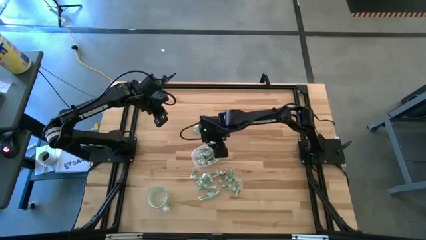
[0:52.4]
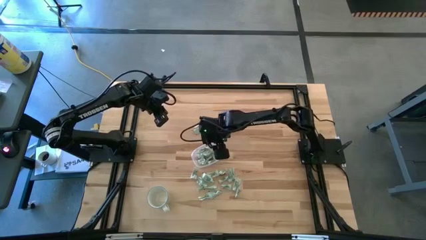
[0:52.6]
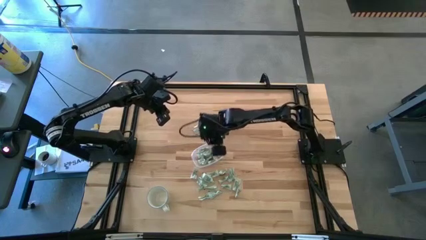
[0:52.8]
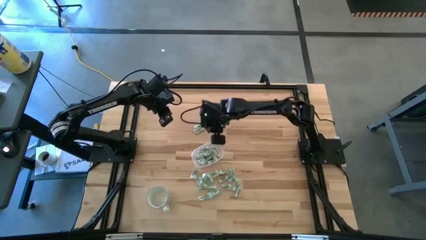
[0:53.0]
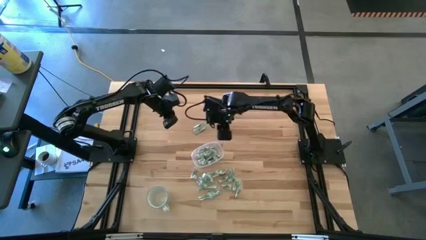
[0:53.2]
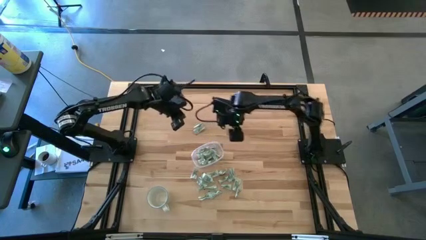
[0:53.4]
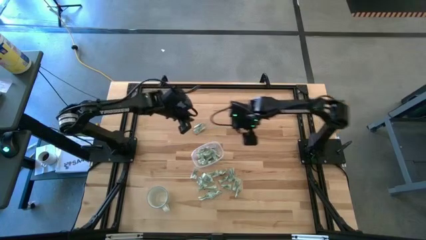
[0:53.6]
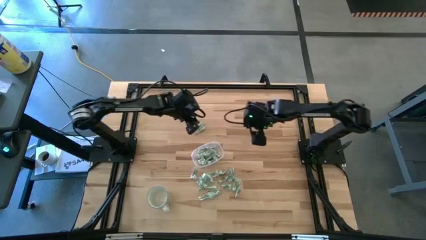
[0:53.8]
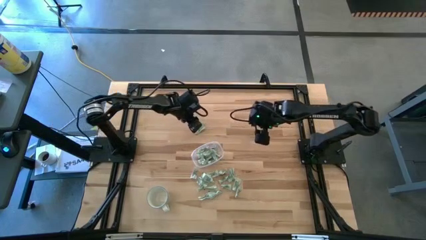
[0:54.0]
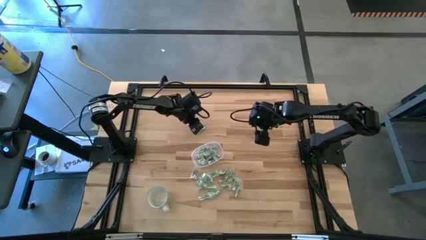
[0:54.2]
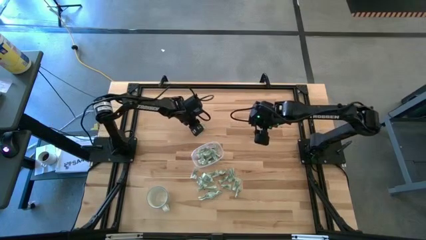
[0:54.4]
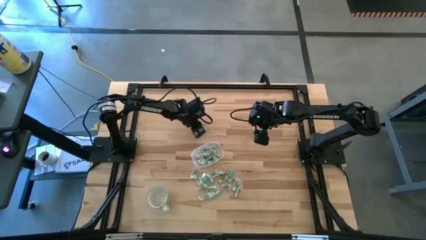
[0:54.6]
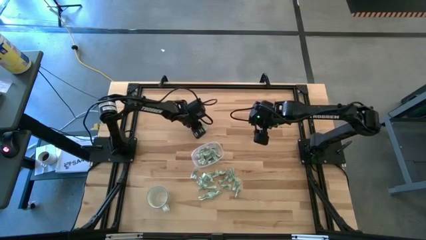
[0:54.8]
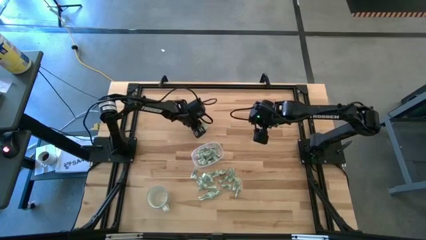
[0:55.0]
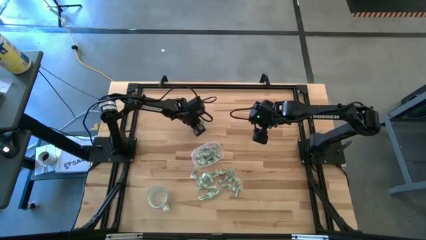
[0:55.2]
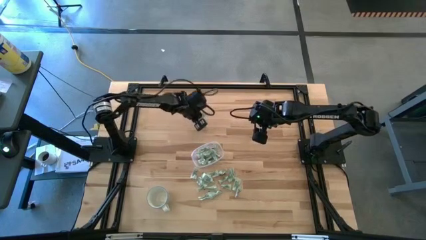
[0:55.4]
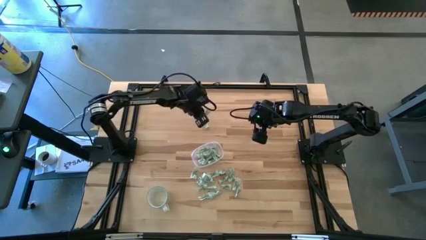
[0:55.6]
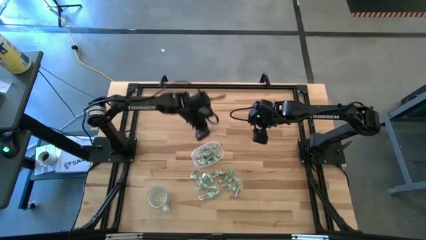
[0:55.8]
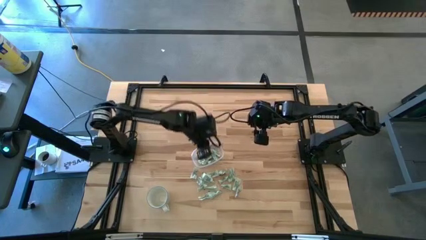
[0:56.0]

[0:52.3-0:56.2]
Task: Pick and place Stevia / Truvia into bins
Put the stevia packet into the transparent container

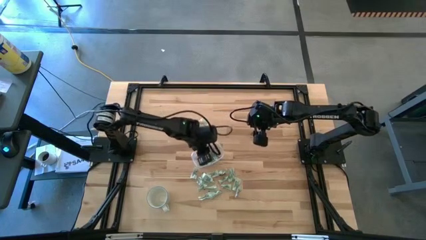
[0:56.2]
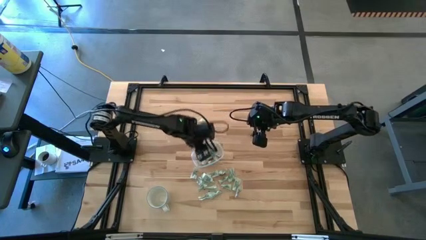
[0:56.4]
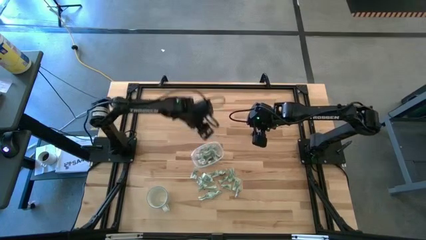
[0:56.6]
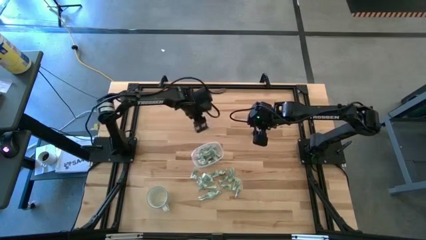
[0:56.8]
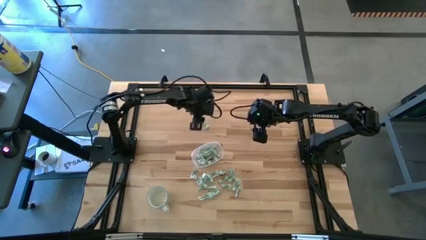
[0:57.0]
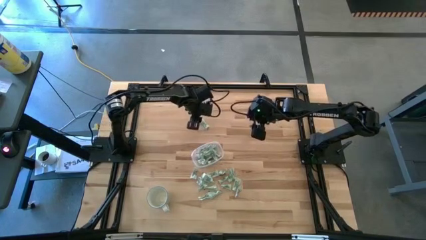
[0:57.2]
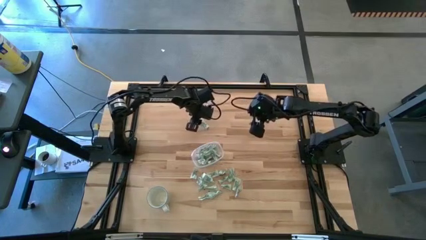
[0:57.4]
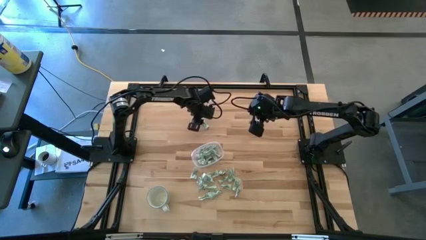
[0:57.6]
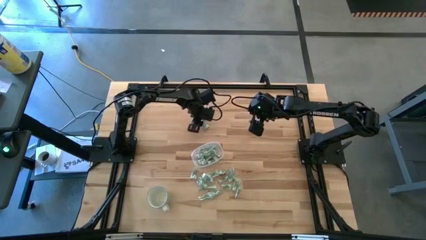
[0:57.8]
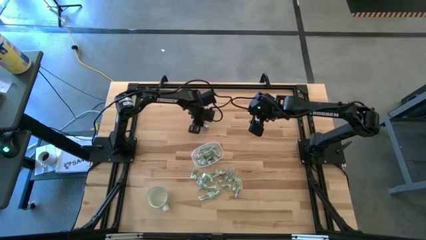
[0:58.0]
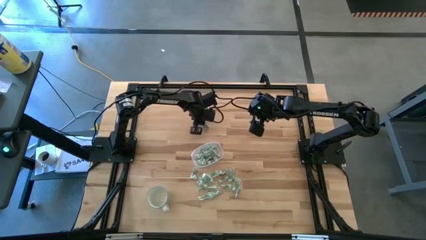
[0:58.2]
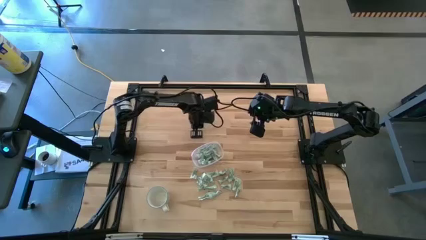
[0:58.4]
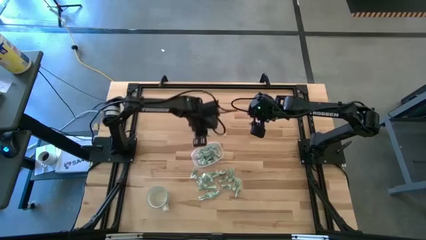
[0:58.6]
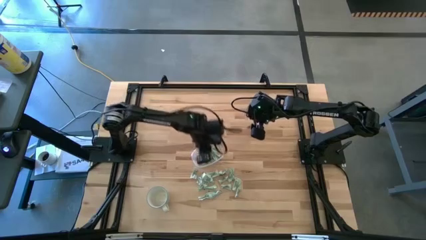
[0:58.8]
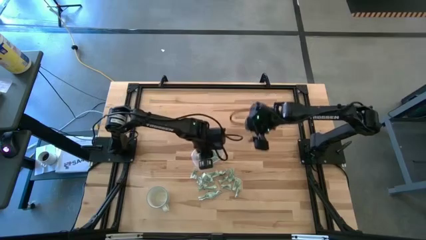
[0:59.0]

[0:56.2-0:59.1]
Put the stevia packet into the transparent container

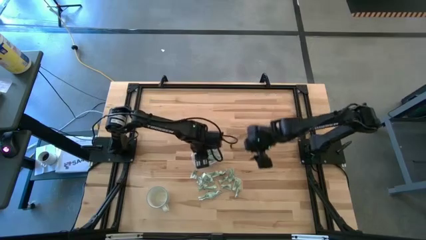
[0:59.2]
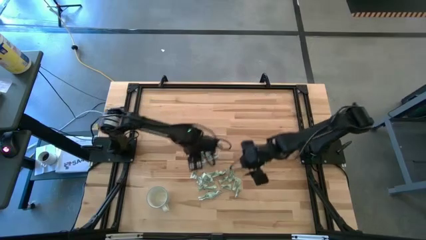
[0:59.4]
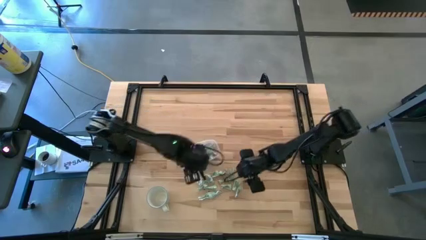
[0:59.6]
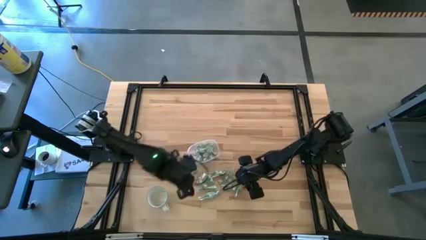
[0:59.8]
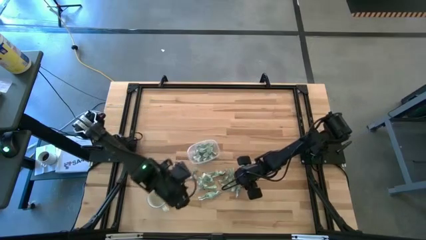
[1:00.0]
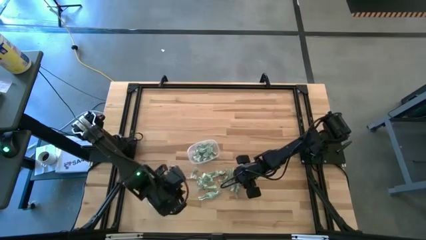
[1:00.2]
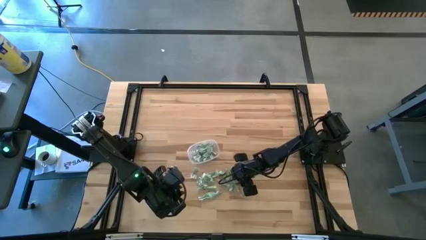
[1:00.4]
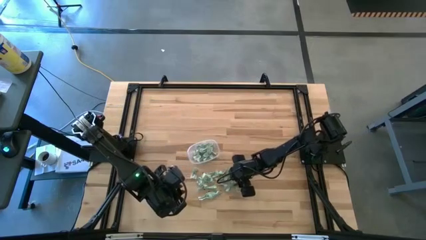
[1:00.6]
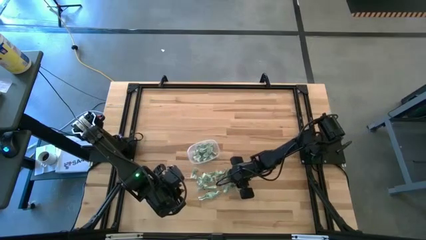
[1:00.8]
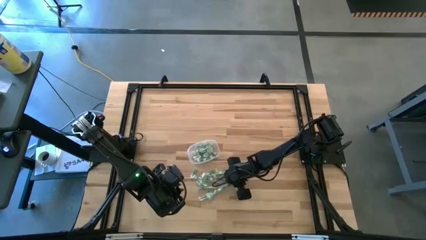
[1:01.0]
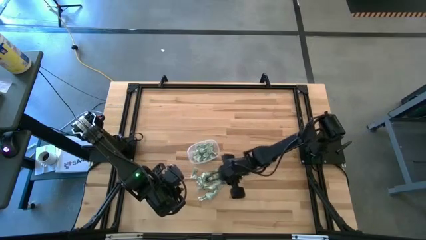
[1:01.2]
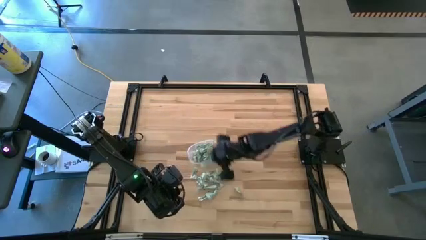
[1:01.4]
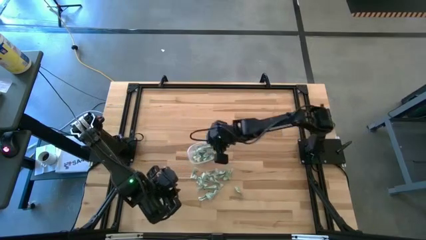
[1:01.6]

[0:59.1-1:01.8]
Put the stevia packet into the transparent container

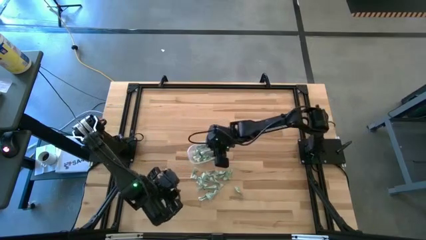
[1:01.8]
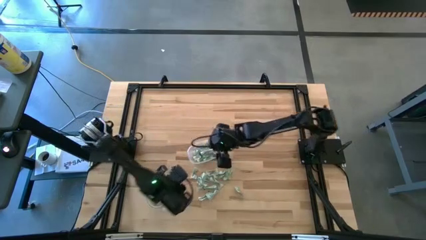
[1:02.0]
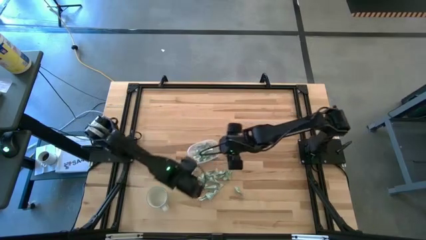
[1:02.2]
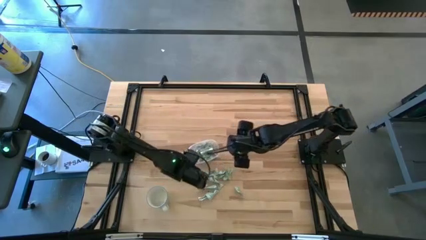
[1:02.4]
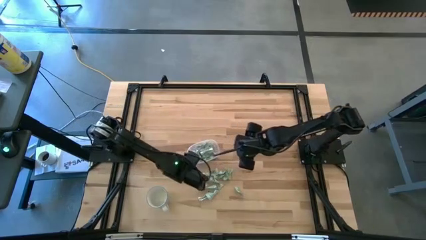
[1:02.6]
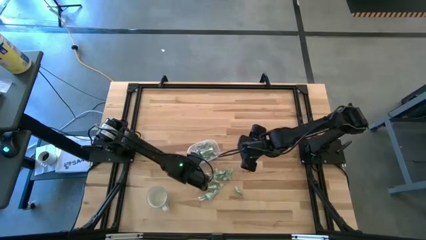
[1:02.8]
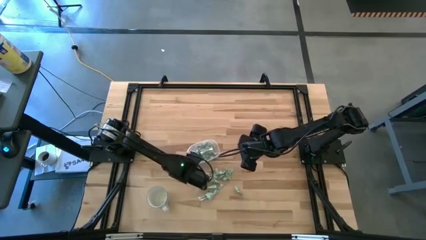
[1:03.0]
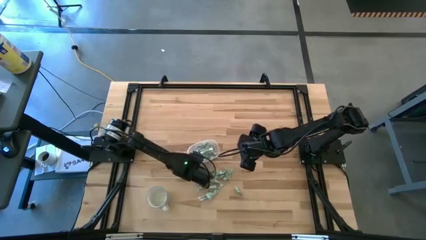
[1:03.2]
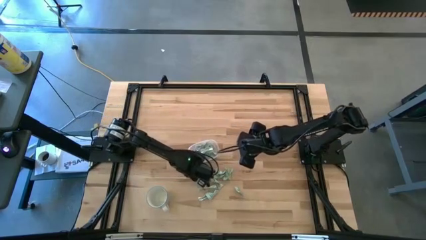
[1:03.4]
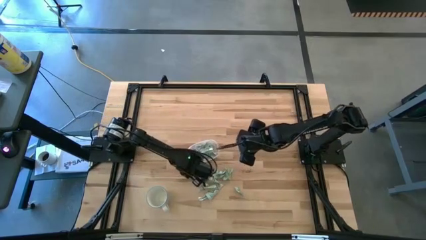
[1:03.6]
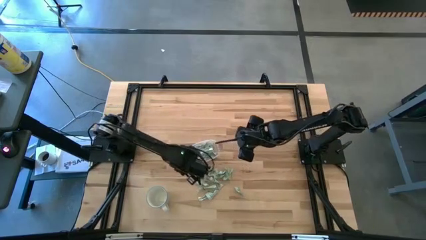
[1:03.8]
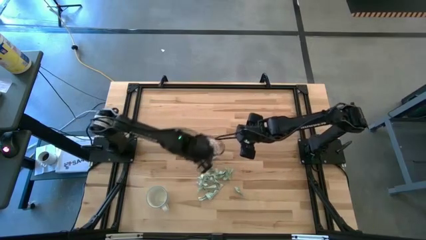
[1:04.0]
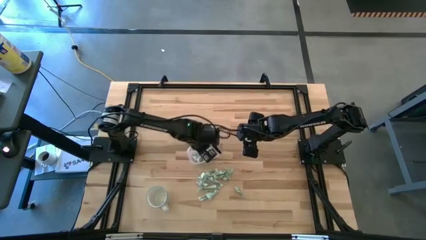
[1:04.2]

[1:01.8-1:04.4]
Put the stevia packet into the transparent container

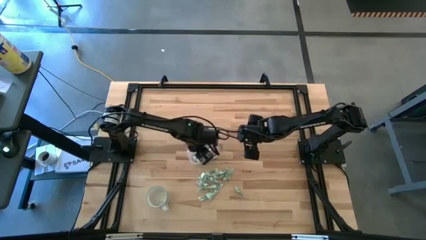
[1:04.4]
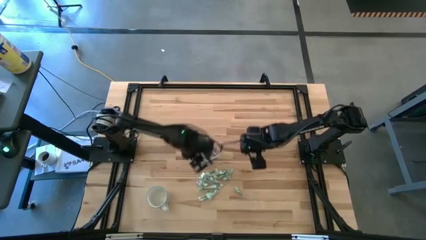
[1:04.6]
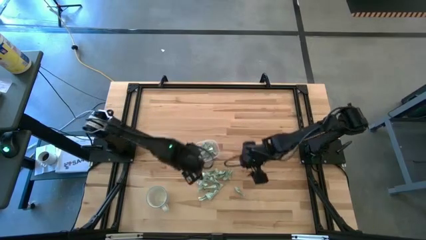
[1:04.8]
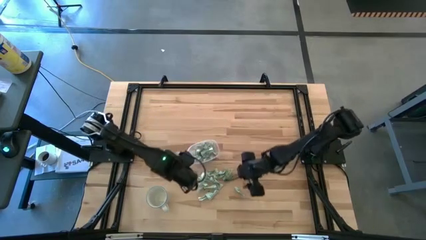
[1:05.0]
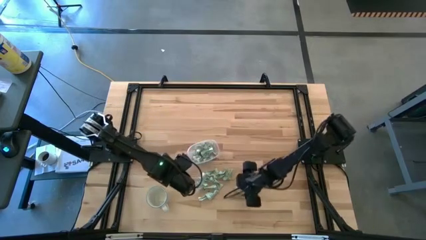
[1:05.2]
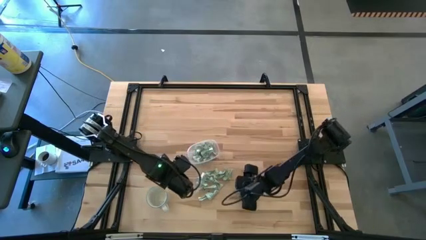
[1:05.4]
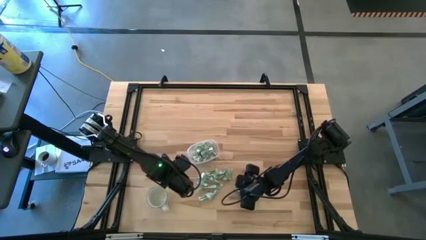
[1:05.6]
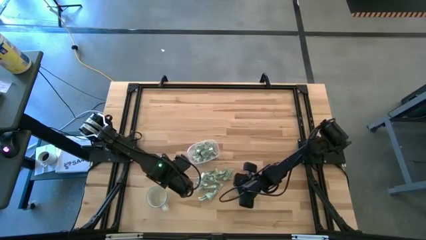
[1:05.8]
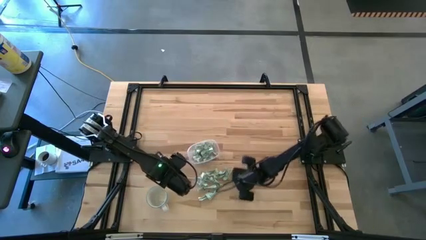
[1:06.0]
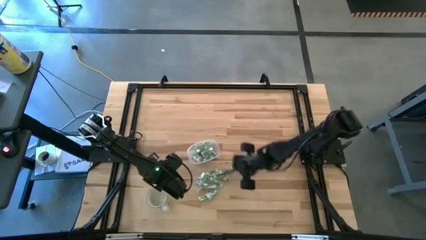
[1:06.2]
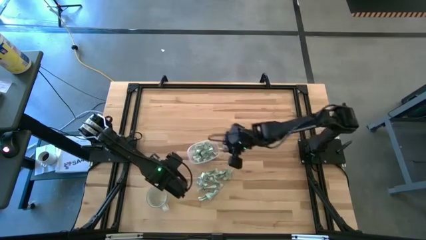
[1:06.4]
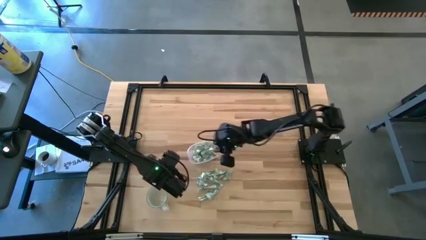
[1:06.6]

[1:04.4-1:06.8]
Put the stevia packet into the transparent container

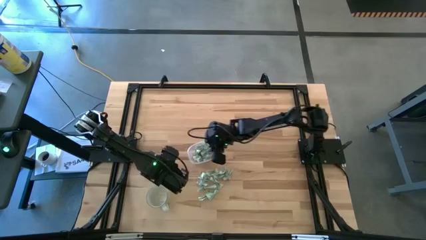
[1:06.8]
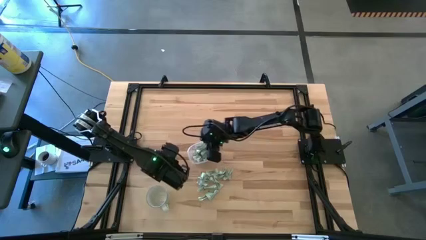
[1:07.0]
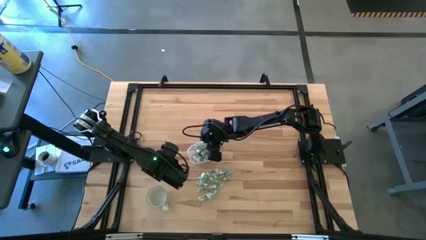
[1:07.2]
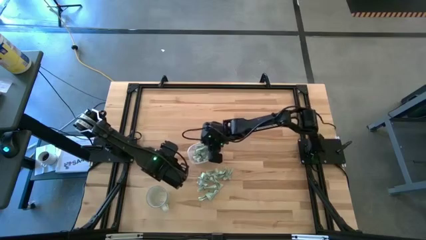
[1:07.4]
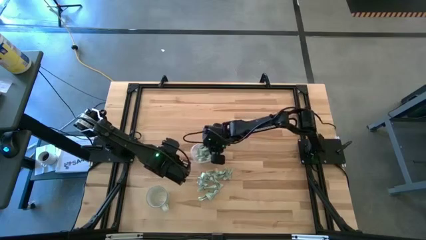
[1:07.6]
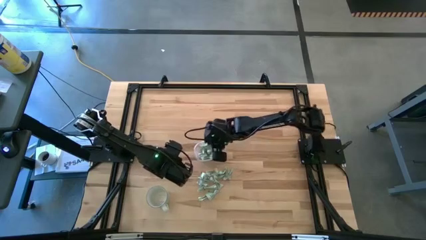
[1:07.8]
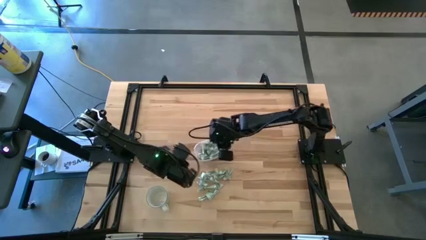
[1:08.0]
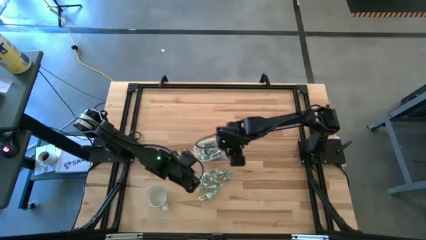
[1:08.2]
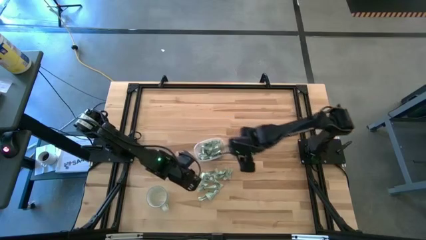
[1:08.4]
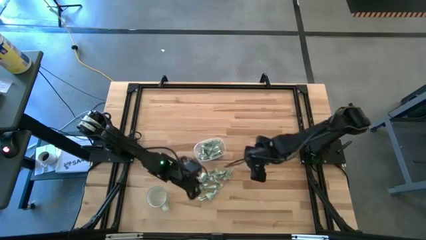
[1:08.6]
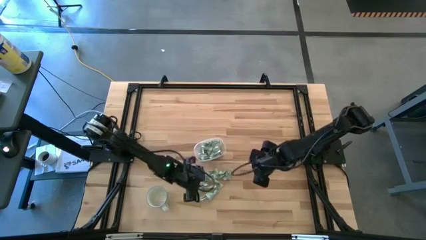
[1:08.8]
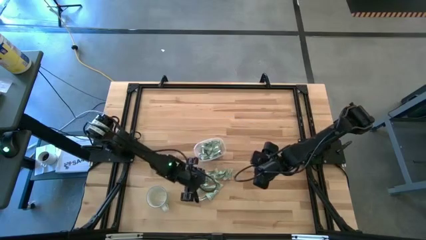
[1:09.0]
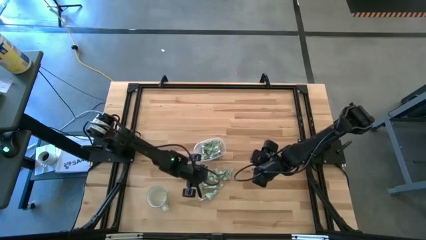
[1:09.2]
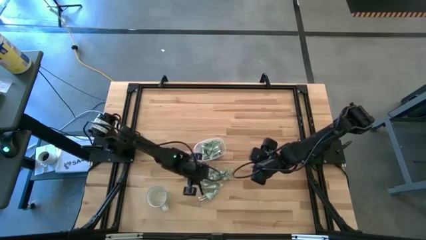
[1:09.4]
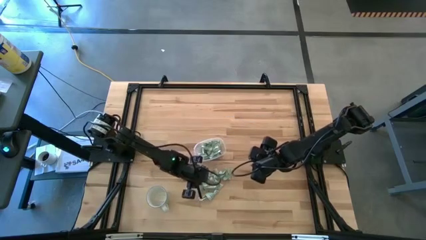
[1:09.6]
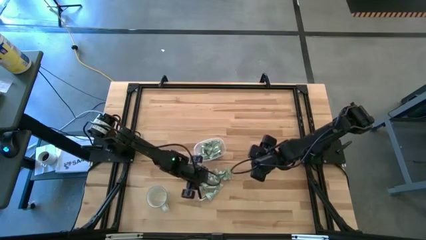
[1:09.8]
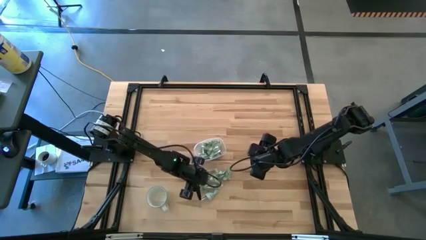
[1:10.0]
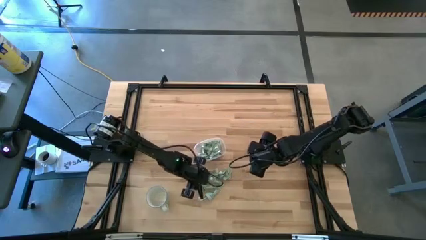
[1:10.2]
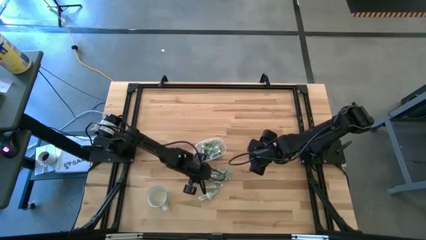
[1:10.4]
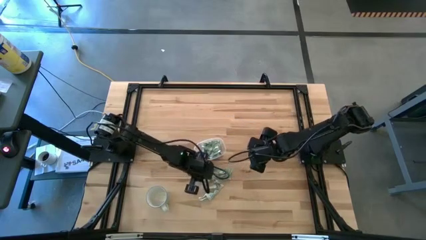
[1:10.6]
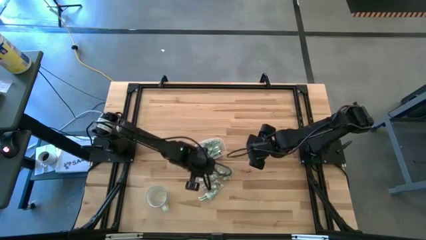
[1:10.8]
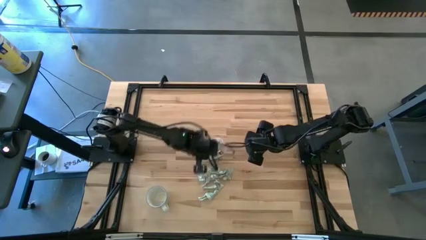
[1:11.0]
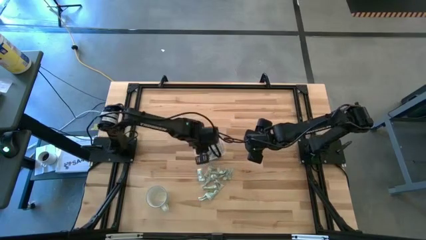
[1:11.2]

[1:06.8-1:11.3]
Put the stevia packet into the transparent container
